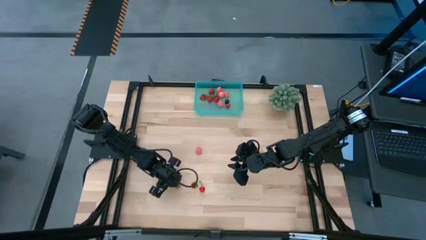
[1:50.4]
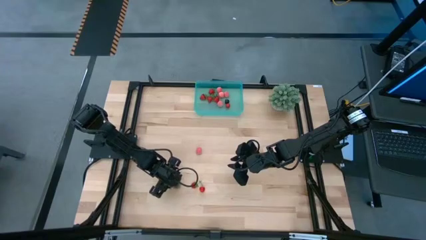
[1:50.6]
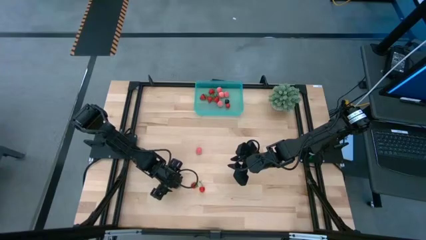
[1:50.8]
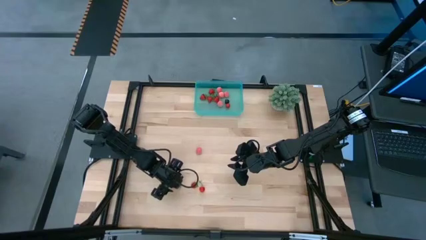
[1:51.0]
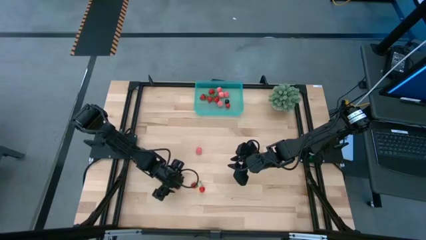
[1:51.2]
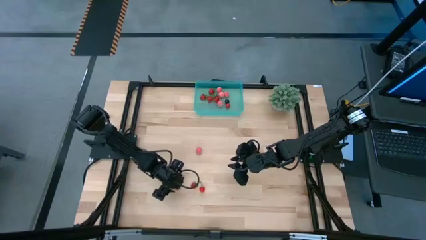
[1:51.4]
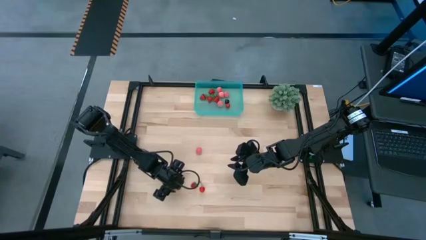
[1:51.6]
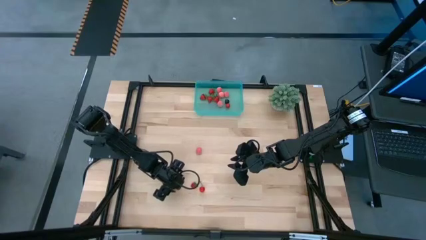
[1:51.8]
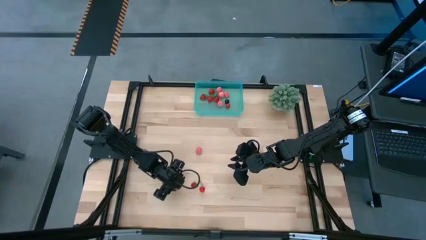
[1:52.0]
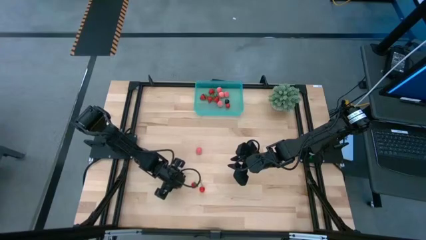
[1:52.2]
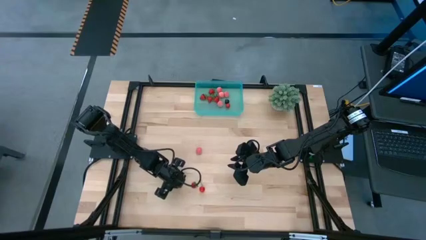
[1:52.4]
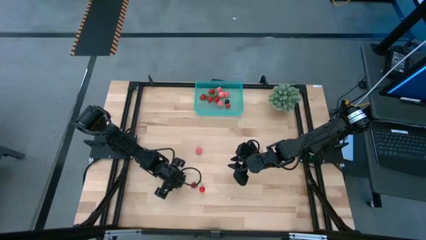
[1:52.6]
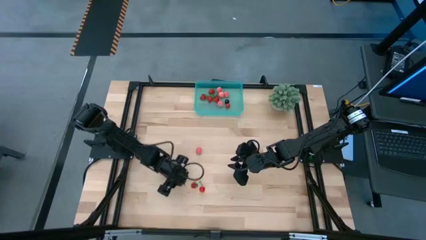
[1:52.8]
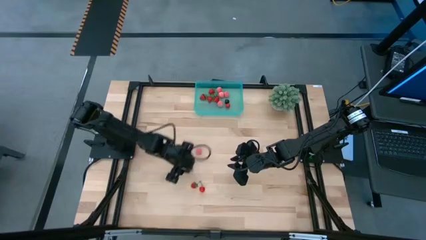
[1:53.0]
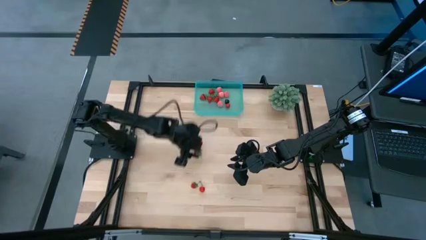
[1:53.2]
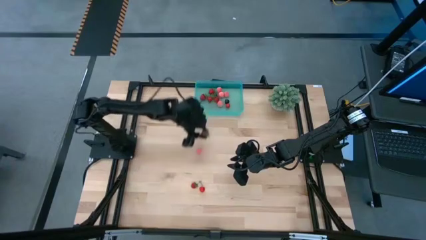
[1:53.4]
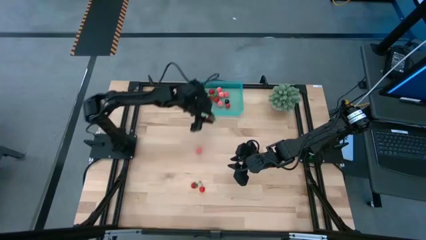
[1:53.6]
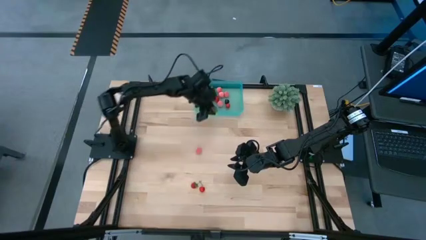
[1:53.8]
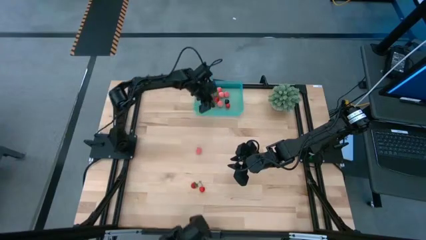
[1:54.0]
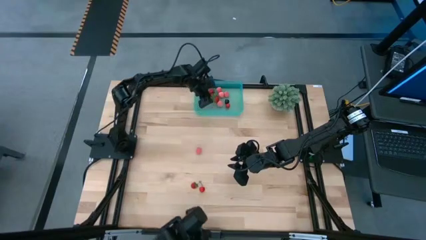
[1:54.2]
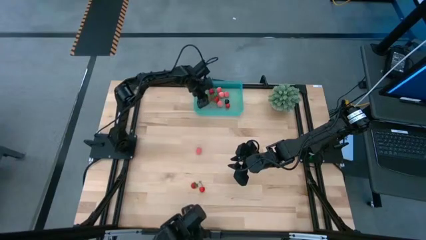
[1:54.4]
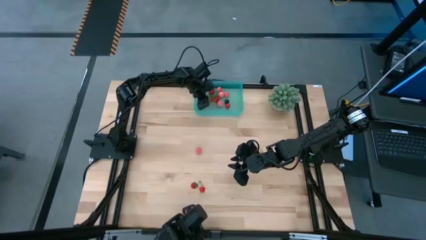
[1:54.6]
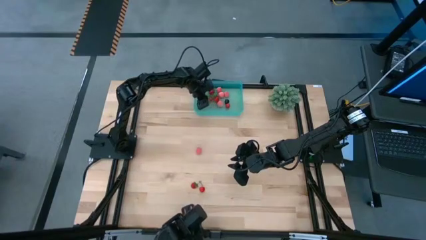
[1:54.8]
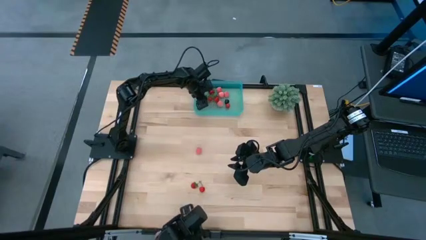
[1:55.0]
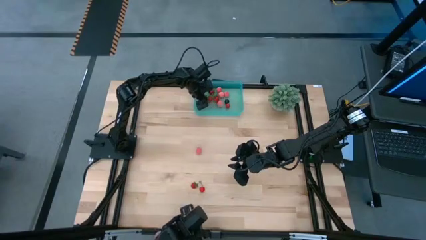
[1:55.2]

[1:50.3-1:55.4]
Task: Pick and placing Produce into tupperware
Put the strawberry into the blue basket

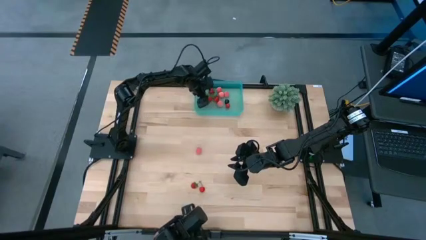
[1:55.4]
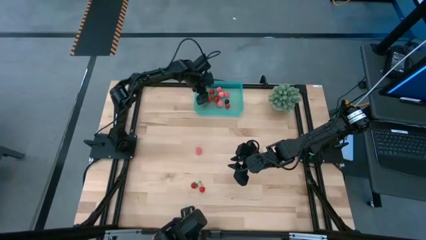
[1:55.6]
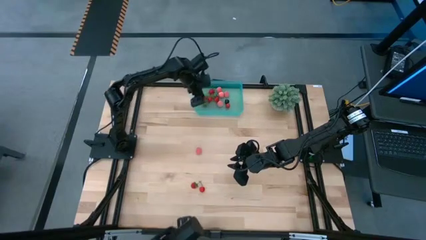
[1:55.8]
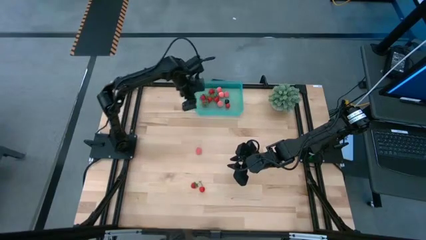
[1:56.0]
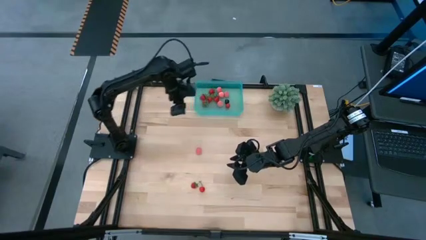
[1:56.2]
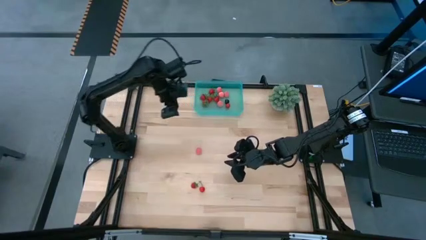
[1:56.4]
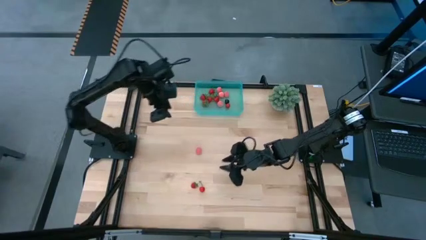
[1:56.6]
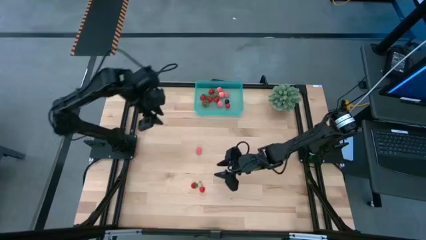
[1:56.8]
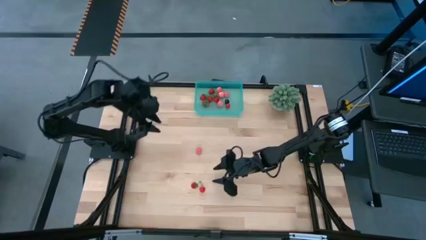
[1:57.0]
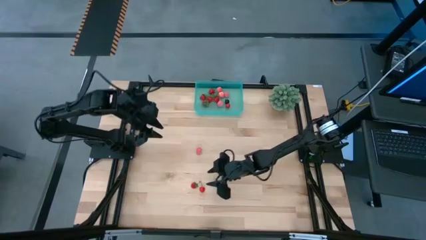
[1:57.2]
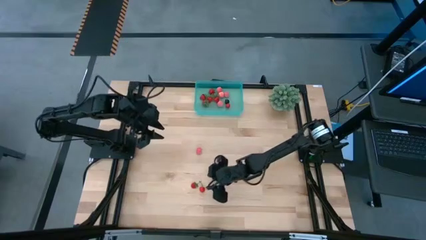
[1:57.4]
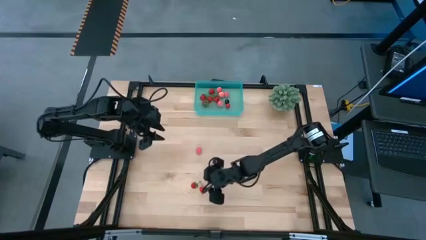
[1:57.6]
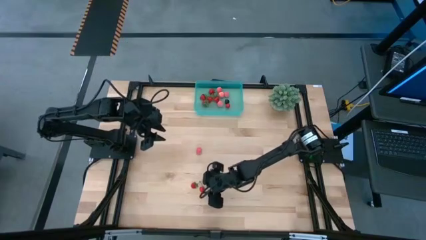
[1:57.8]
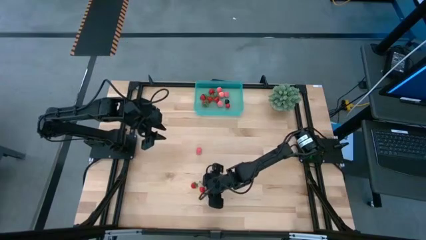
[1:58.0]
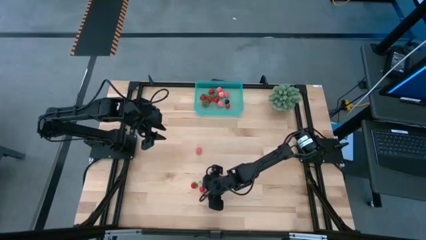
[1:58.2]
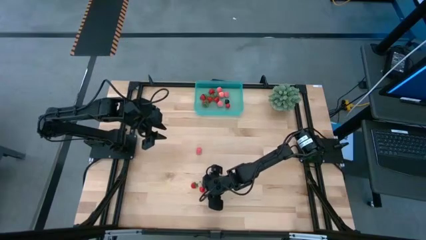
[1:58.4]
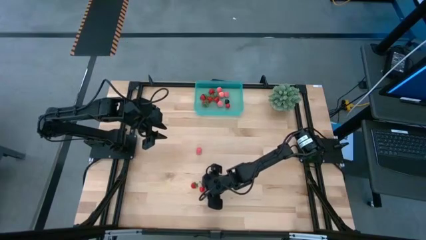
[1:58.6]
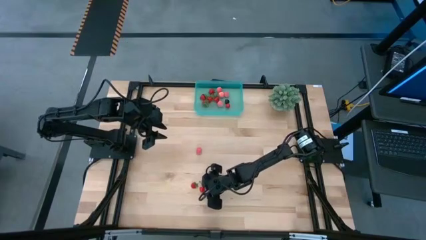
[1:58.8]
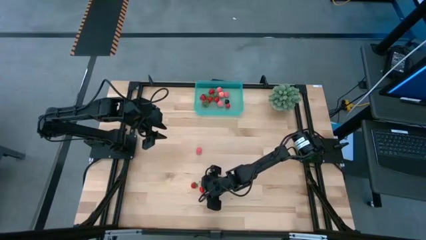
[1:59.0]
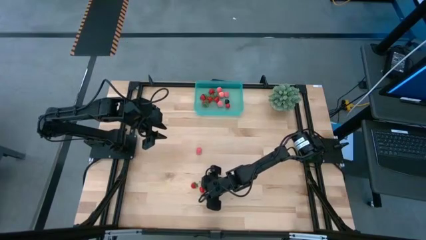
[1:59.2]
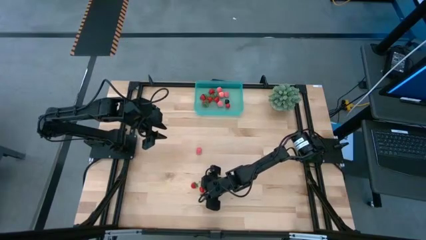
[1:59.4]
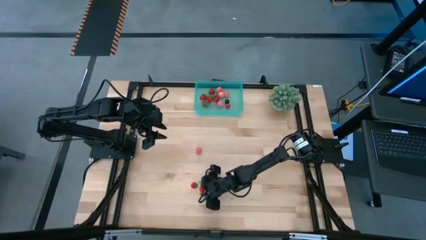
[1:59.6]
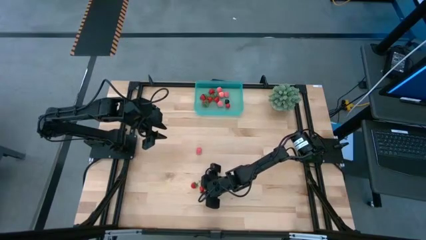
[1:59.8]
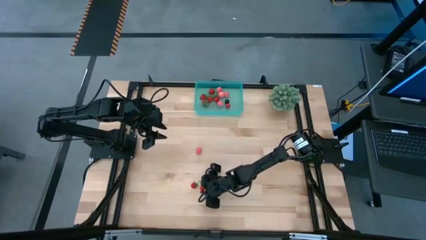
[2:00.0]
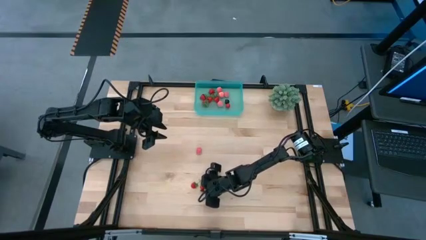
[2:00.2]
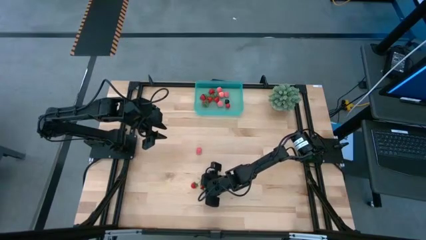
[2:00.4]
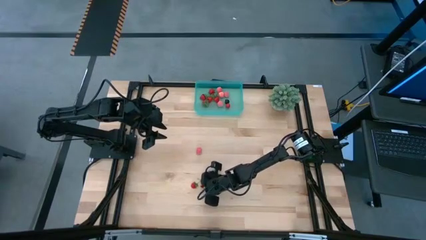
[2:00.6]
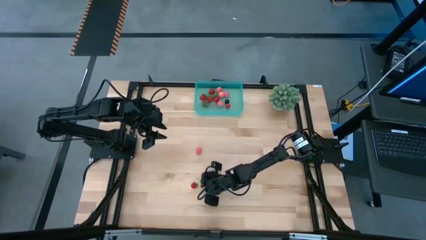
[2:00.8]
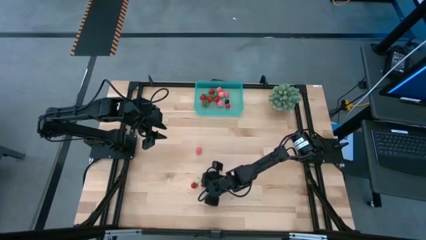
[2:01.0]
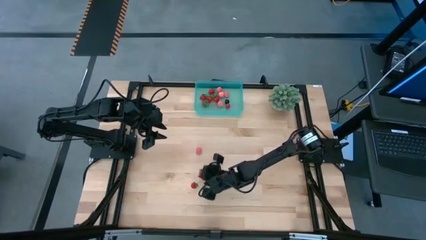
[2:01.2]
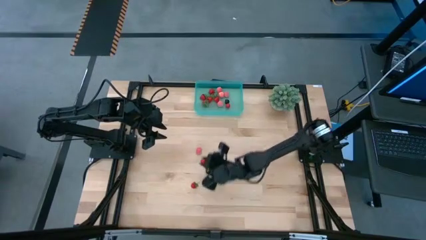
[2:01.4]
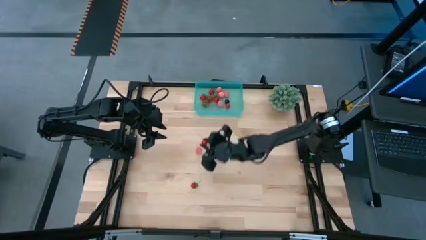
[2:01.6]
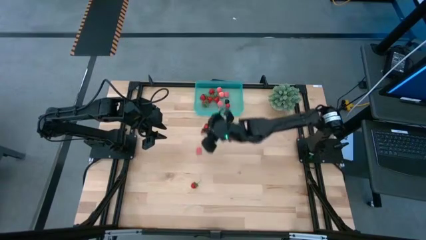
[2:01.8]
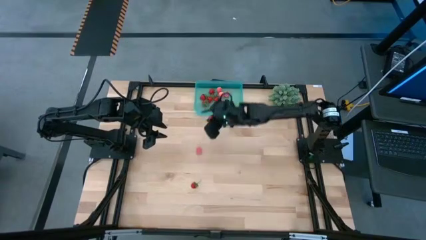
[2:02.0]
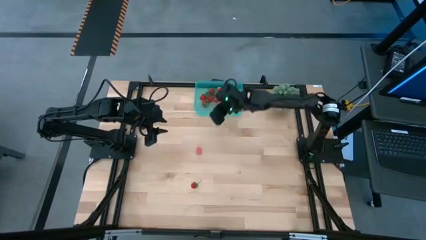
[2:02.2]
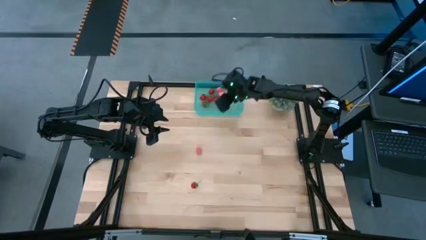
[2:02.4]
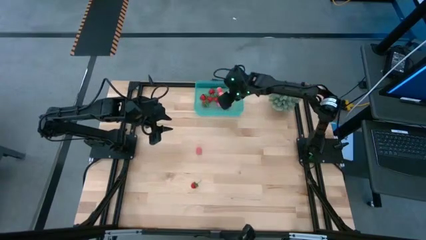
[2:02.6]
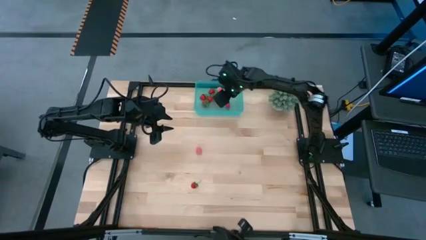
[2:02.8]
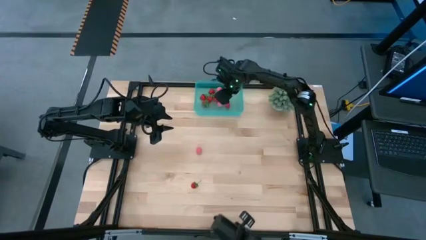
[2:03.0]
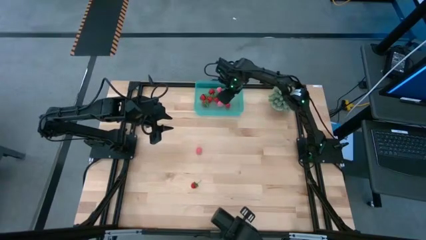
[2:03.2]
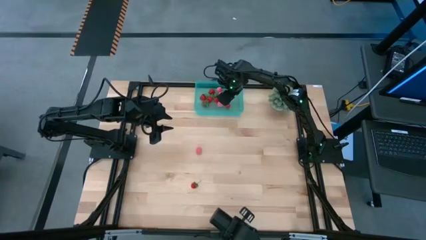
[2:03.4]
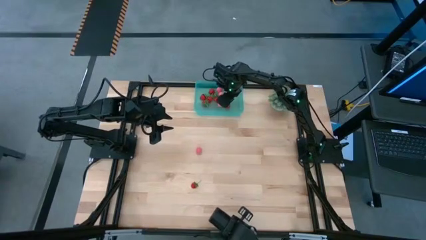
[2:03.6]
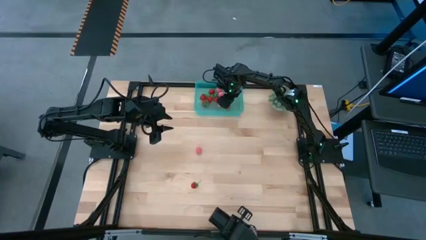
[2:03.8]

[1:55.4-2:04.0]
Put the red cherry into the blue basket
